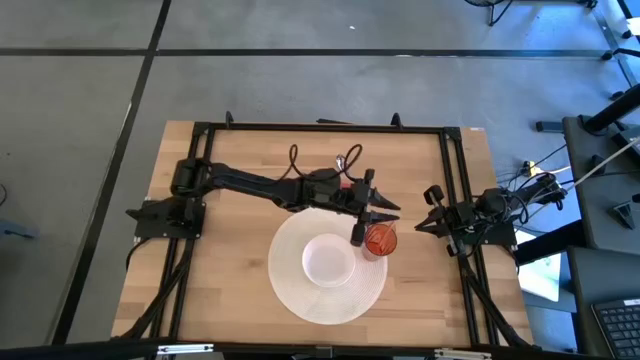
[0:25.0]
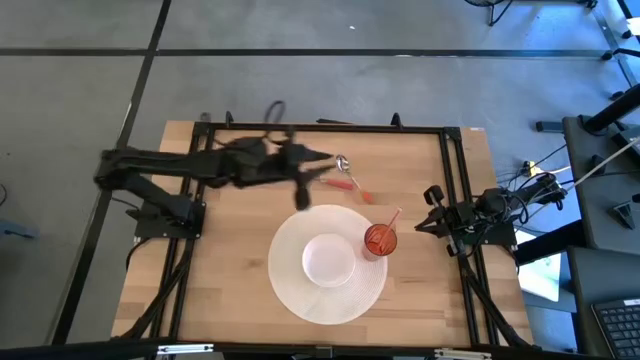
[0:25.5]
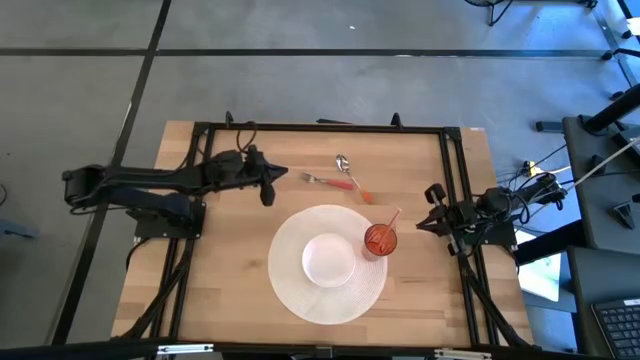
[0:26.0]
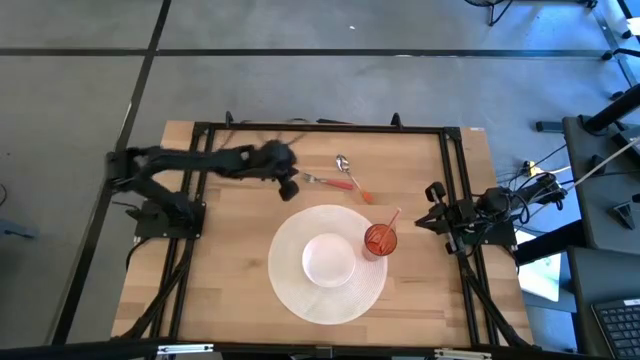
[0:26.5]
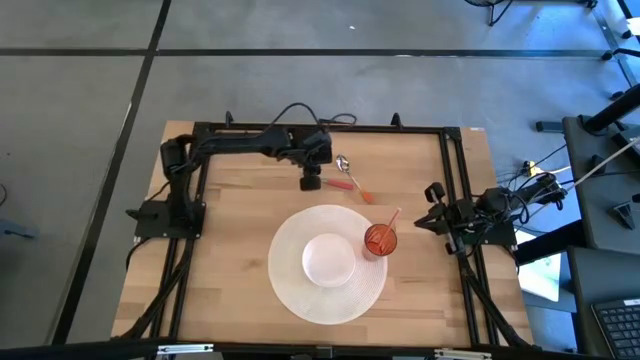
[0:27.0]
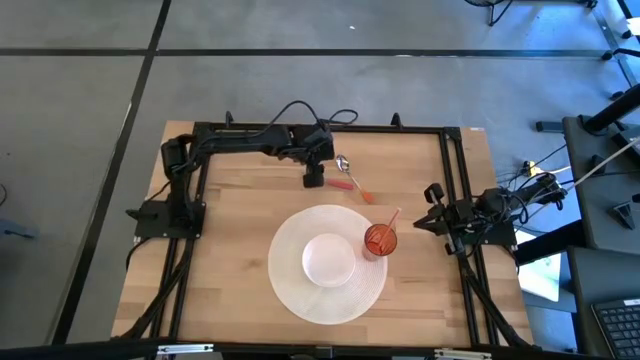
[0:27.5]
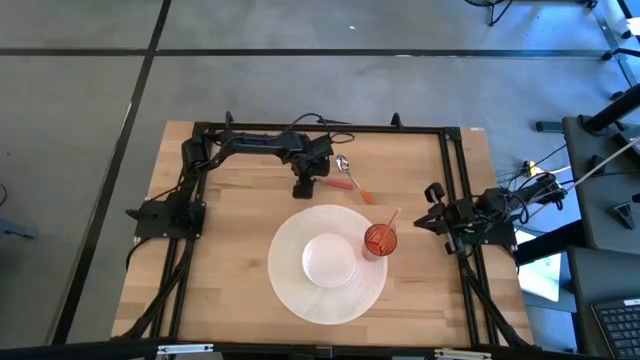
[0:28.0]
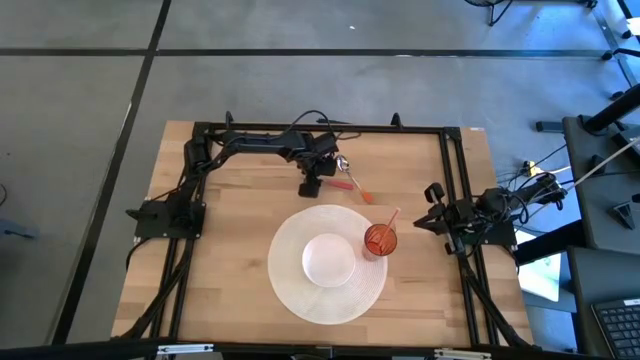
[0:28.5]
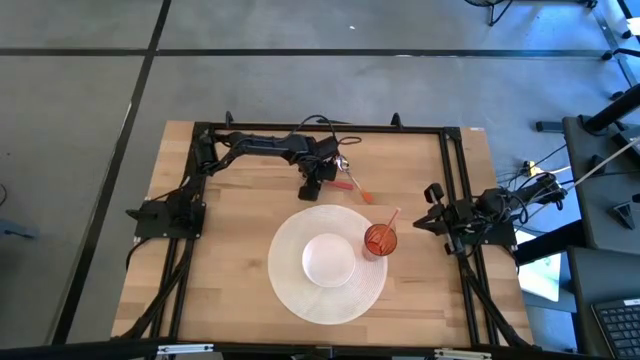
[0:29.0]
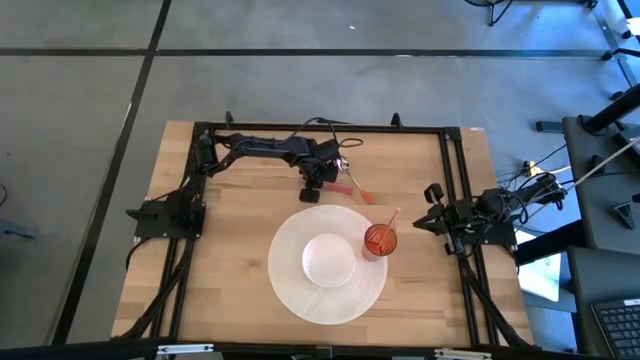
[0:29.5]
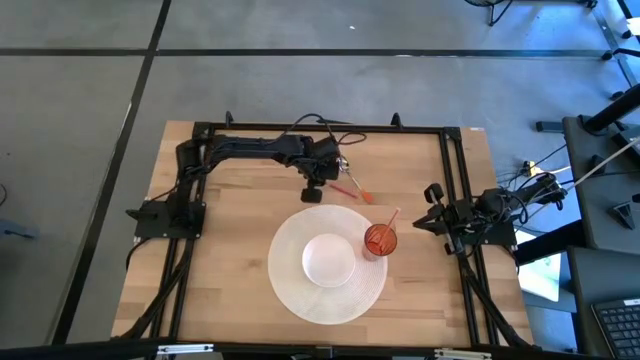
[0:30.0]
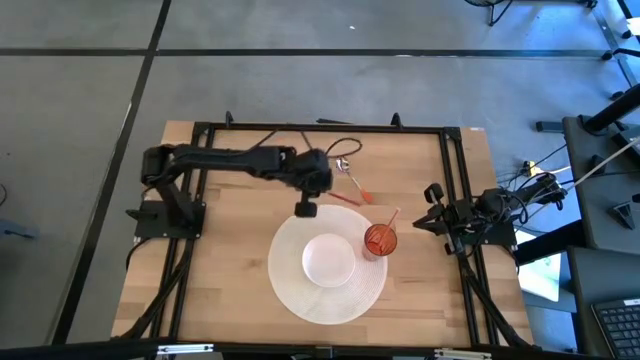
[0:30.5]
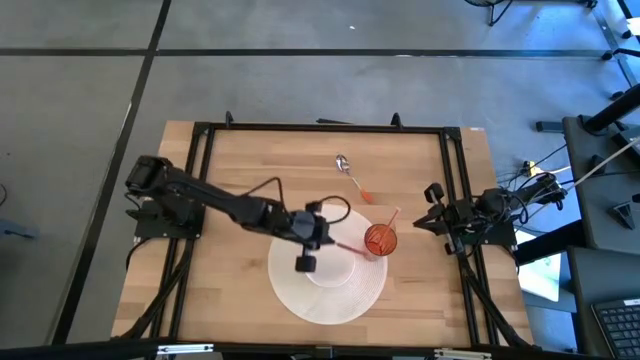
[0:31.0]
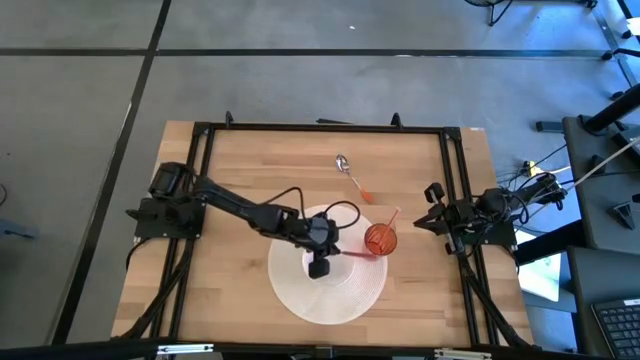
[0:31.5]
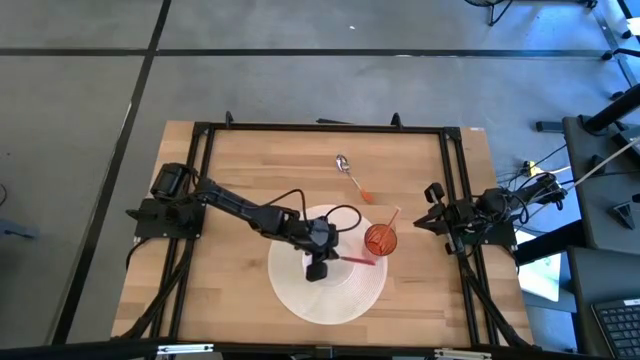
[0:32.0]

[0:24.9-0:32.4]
Task: Pick & Place Utensil
Put the pink fork into the white bowl on the white mat

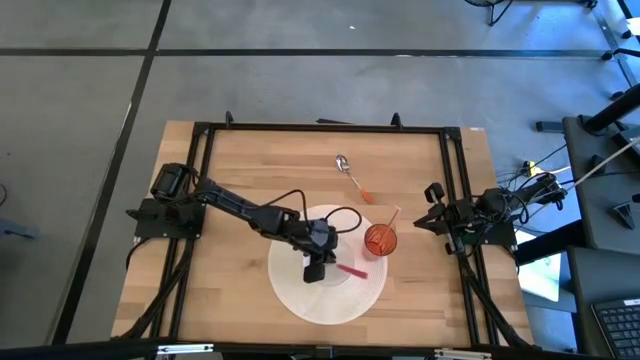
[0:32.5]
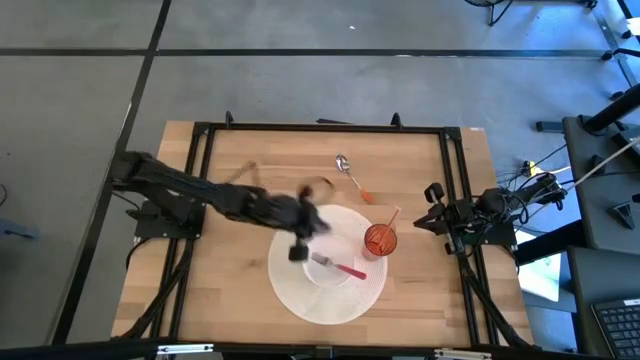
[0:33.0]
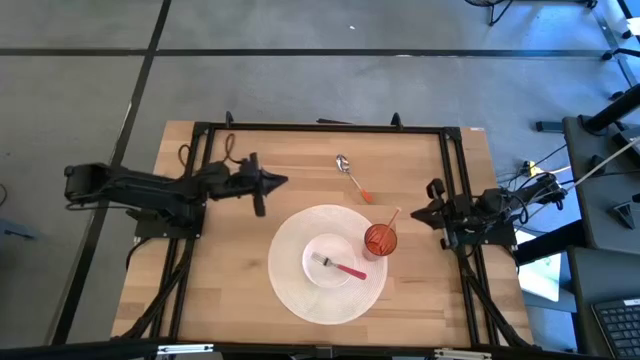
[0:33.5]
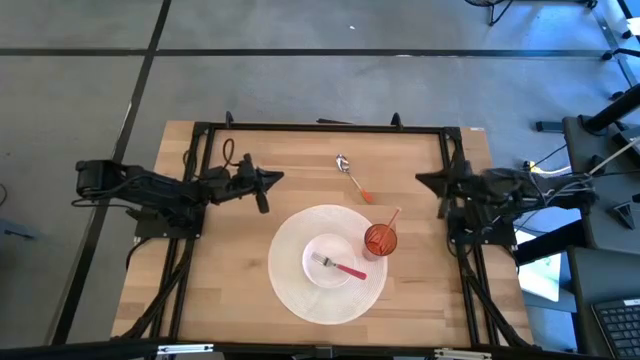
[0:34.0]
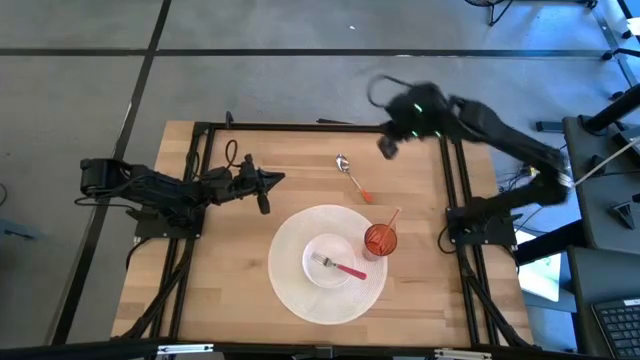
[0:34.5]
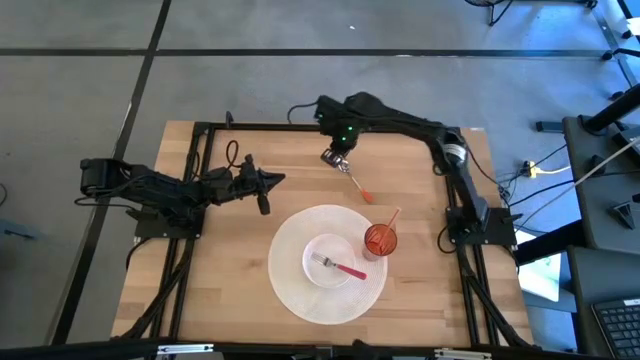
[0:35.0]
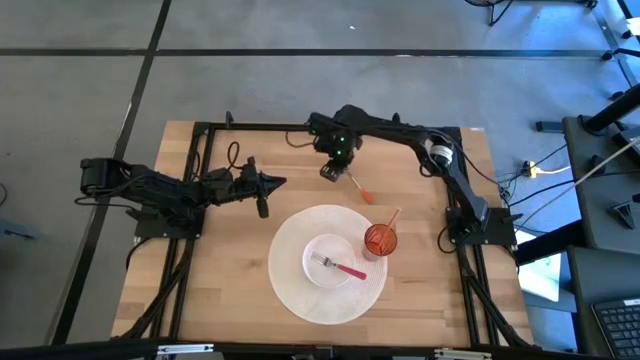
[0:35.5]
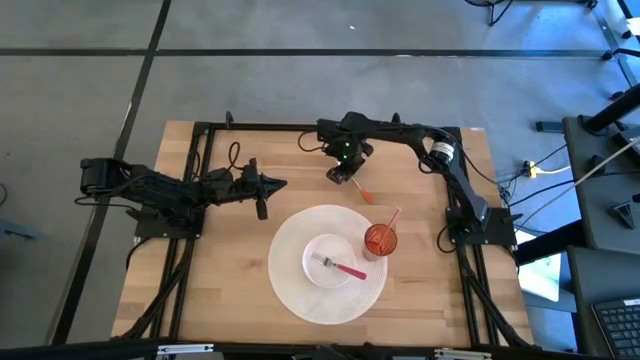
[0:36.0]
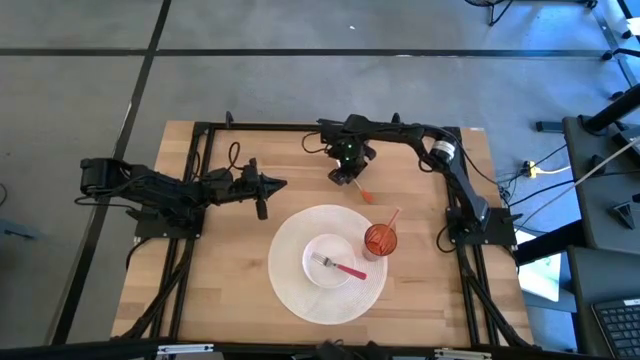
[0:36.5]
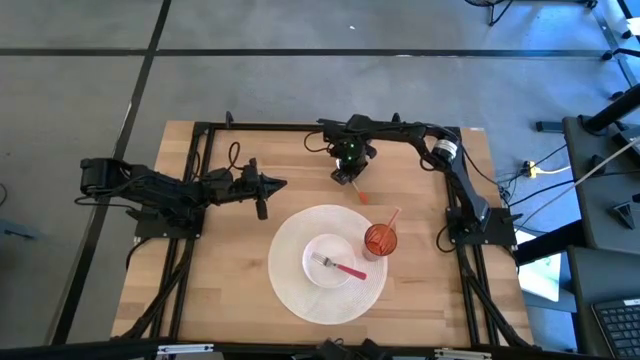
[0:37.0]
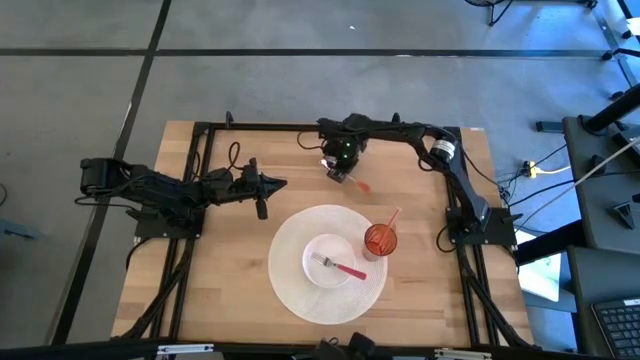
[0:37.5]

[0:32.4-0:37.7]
Put the orange spoon into the white bowl on the white mat

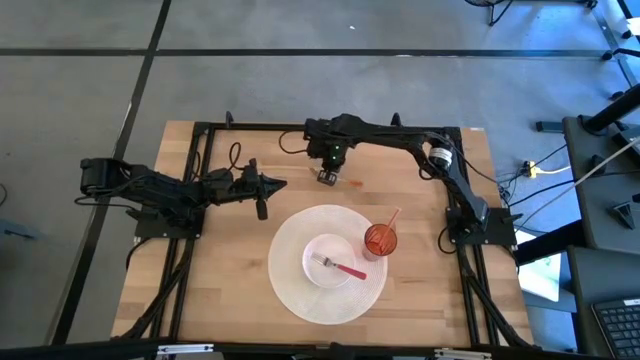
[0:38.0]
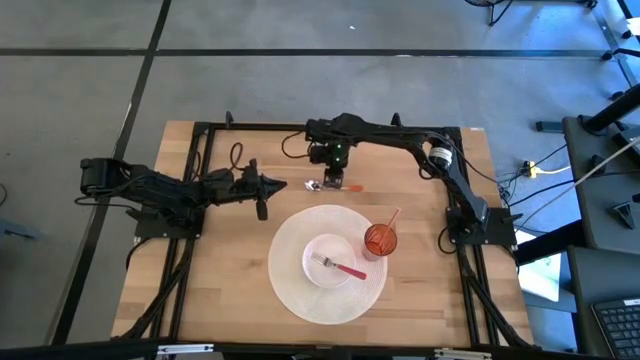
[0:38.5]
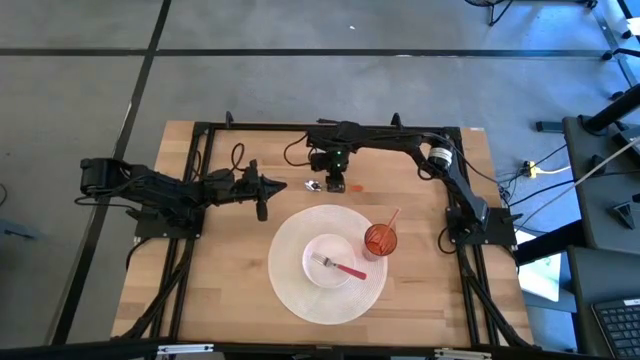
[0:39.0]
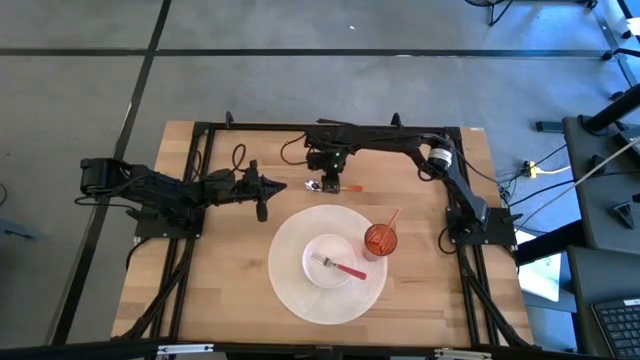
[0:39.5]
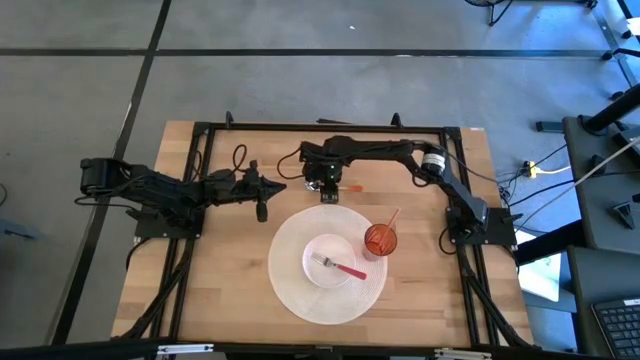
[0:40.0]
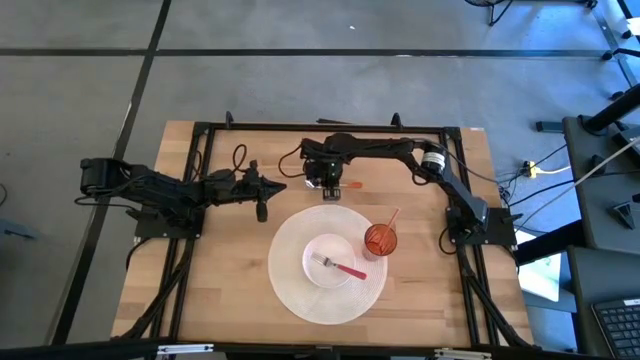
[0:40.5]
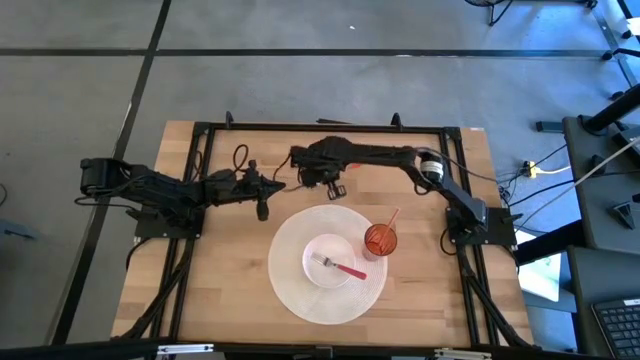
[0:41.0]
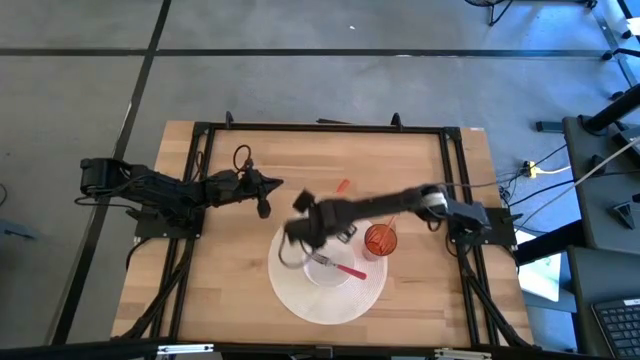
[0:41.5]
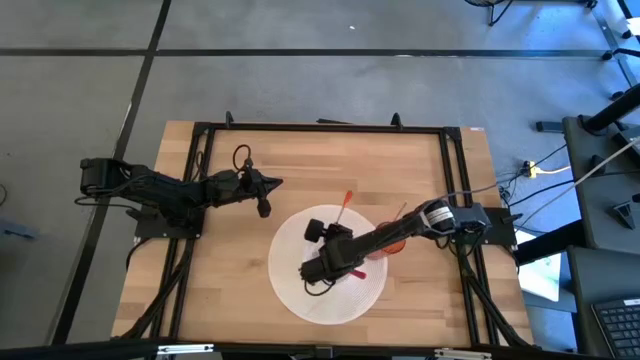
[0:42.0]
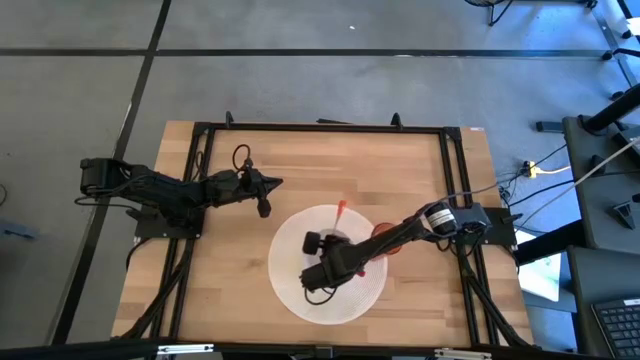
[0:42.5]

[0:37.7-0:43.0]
Put the orange spoon into the white bowl on the white mat

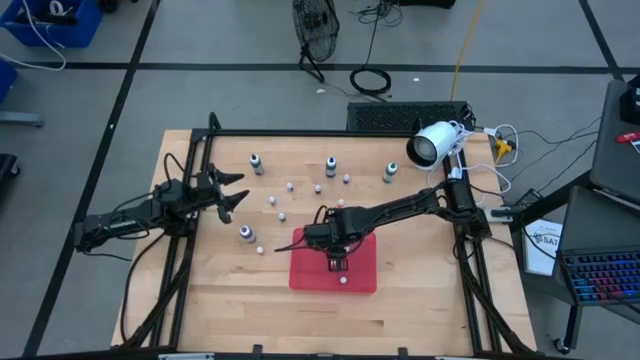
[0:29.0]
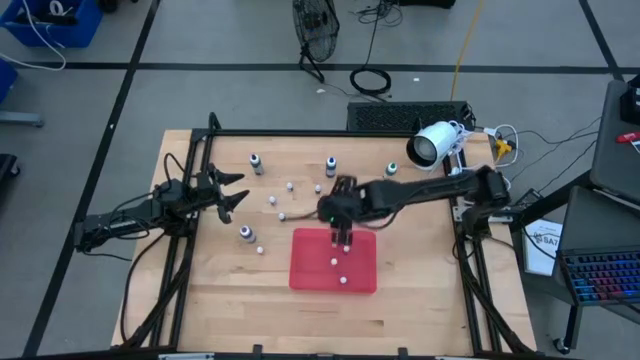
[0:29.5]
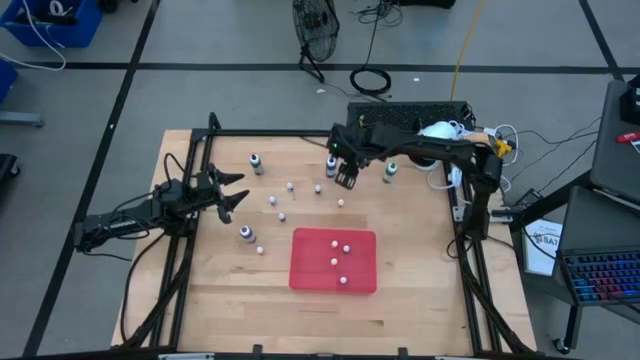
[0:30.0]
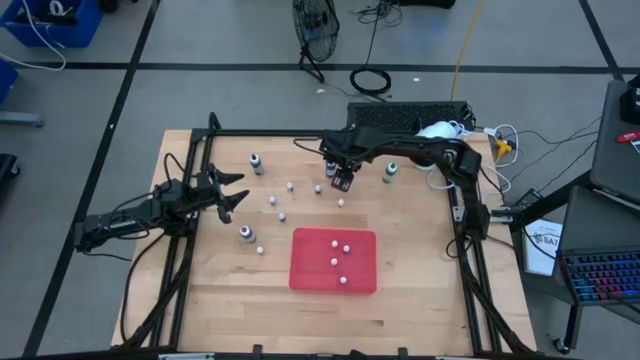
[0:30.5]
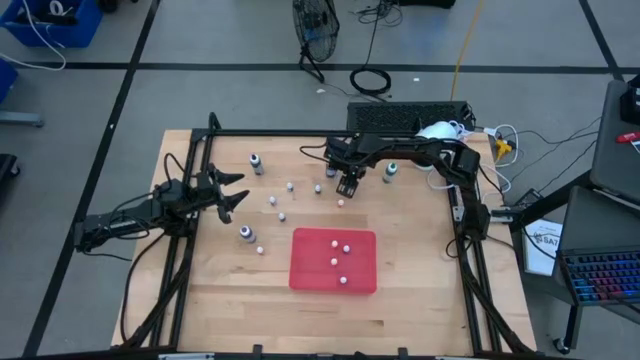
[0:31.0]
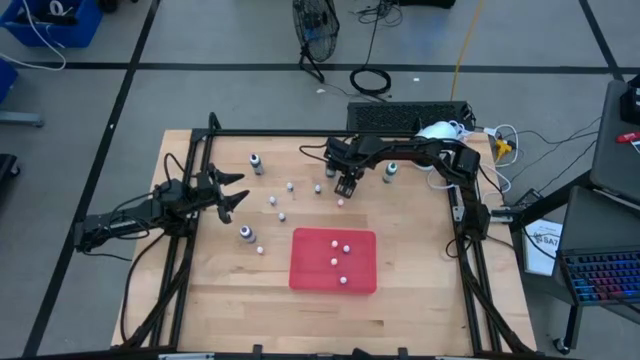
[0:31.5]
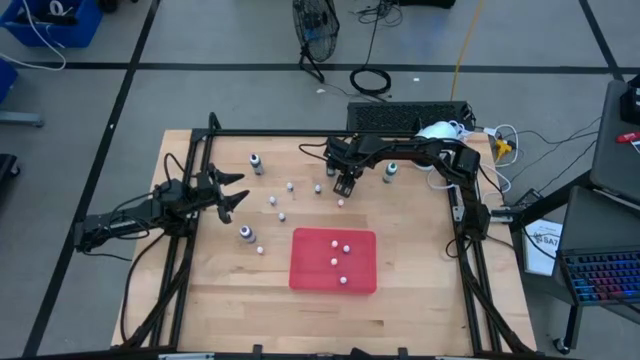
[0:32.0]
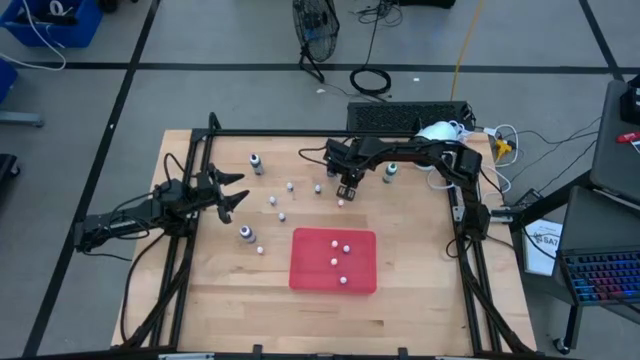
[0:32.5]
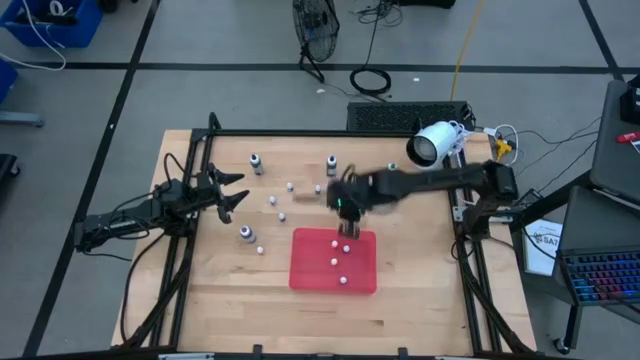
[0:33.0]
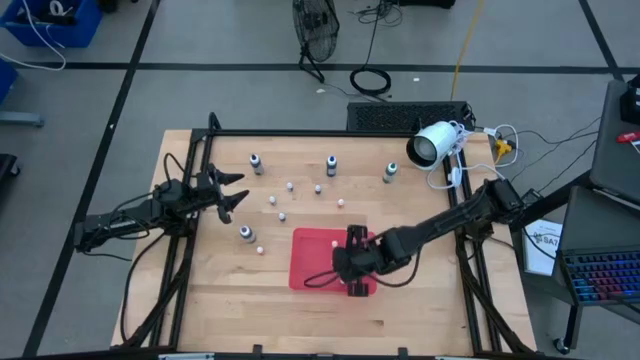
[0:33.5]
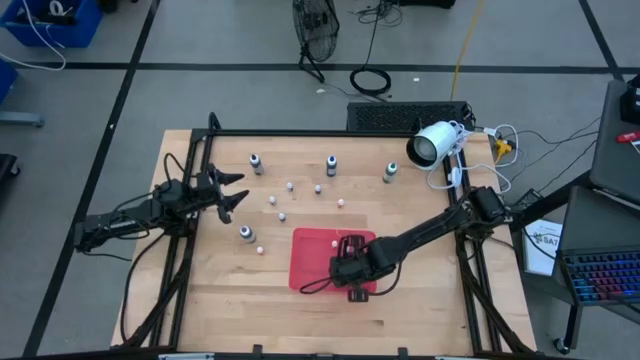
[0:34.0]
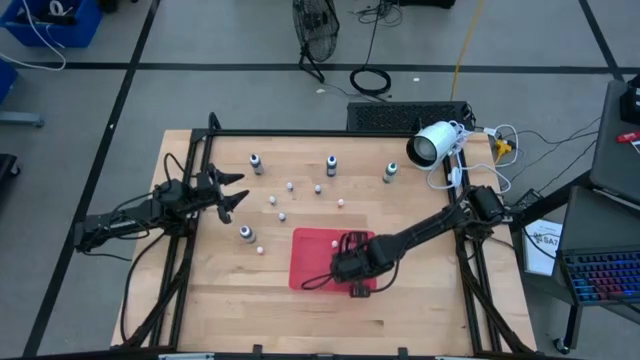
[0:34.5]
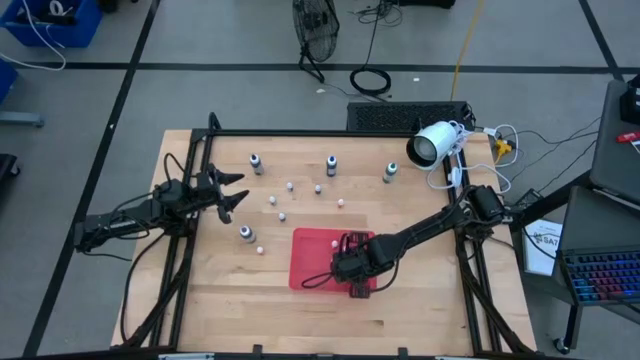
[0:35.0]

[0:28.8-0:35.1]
Task: Pick & Place food coloring
Put the small black food coloring bottle into the red bin
